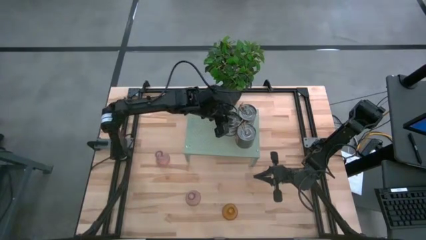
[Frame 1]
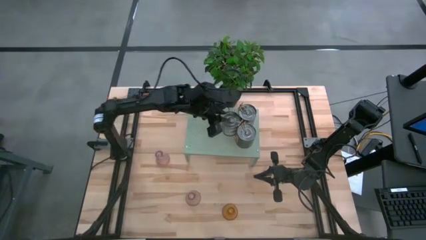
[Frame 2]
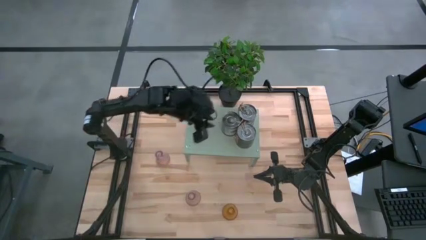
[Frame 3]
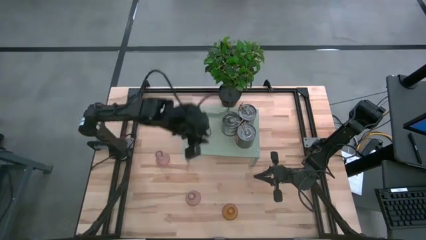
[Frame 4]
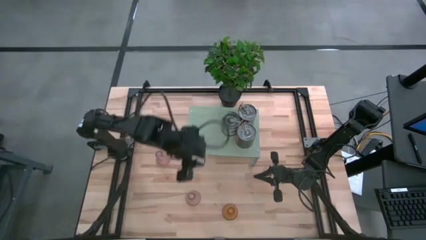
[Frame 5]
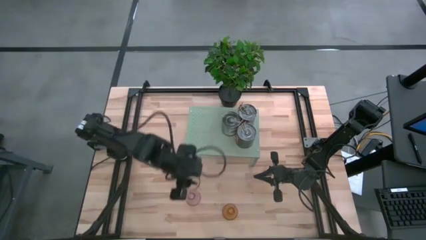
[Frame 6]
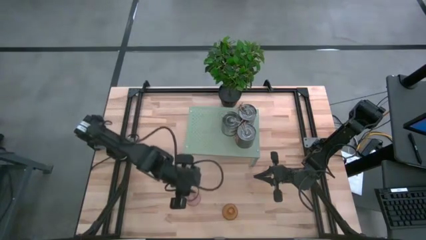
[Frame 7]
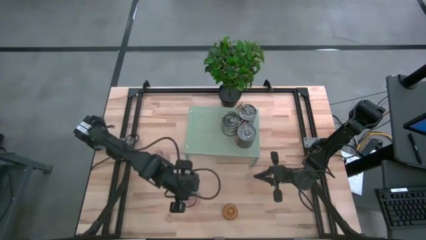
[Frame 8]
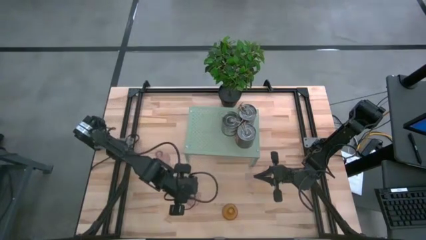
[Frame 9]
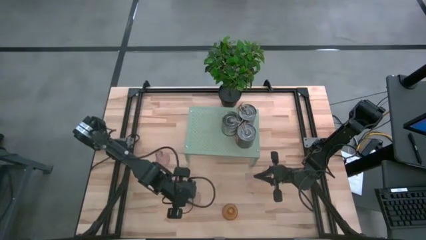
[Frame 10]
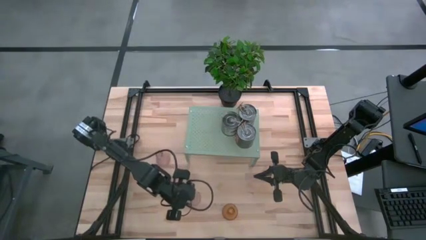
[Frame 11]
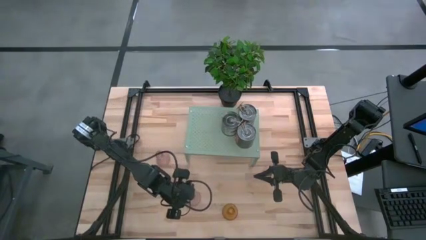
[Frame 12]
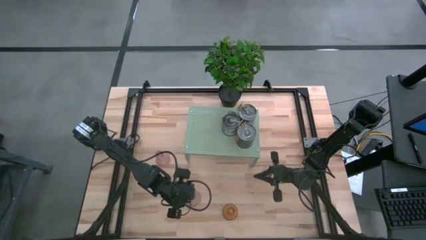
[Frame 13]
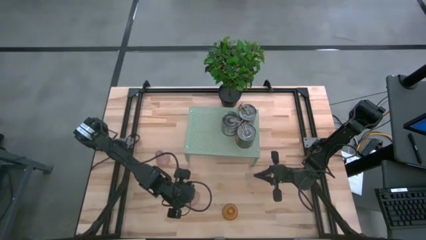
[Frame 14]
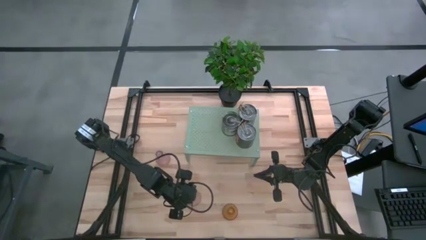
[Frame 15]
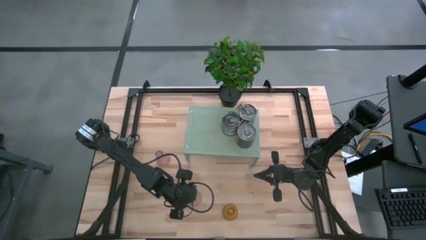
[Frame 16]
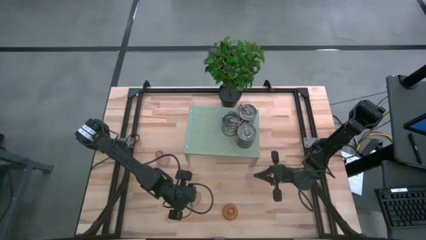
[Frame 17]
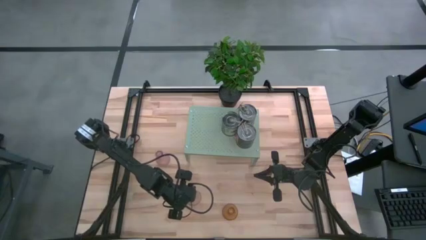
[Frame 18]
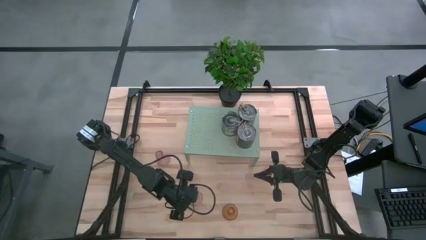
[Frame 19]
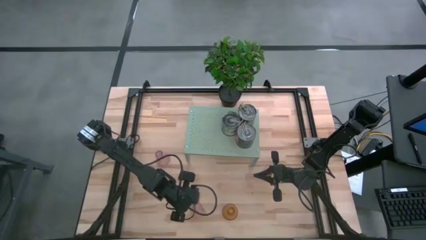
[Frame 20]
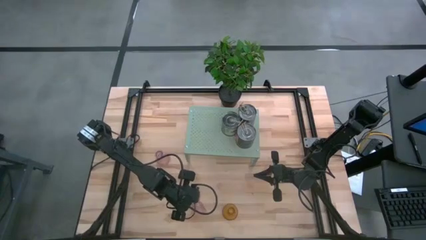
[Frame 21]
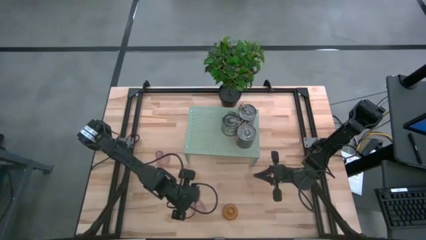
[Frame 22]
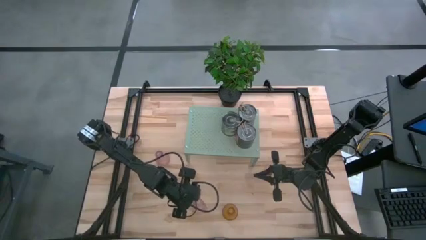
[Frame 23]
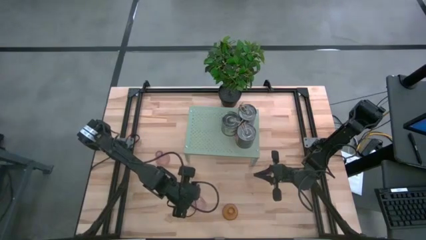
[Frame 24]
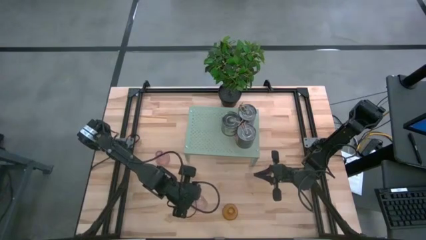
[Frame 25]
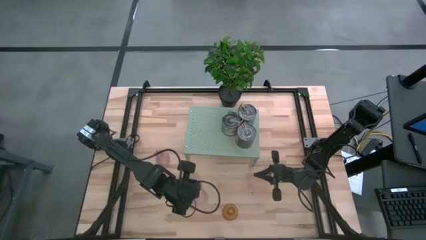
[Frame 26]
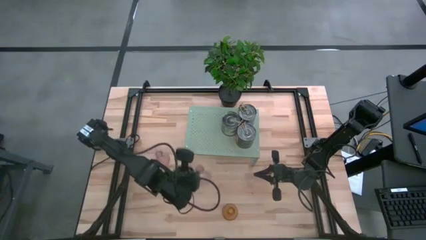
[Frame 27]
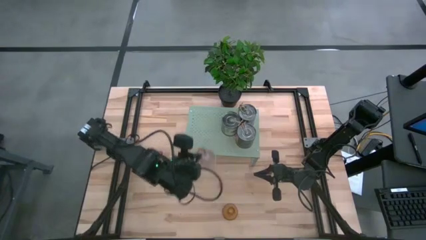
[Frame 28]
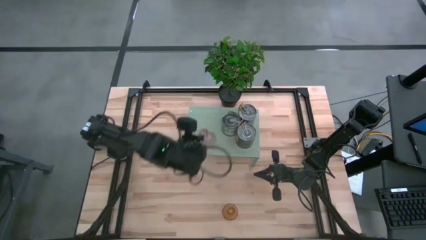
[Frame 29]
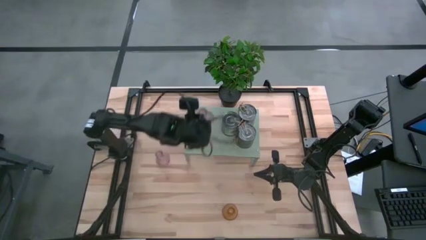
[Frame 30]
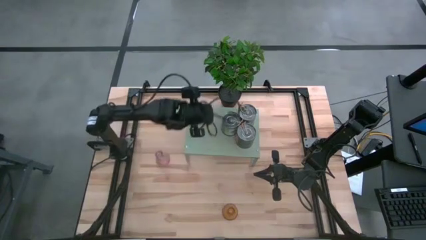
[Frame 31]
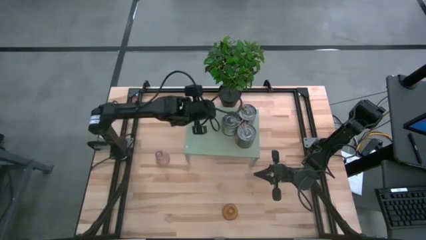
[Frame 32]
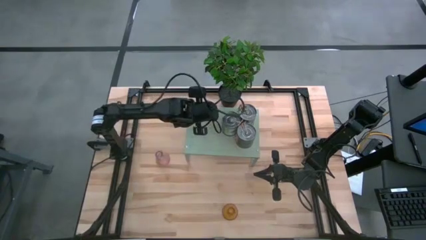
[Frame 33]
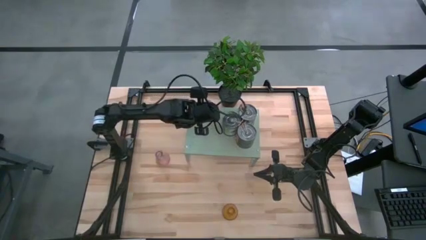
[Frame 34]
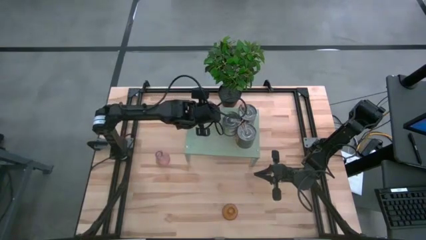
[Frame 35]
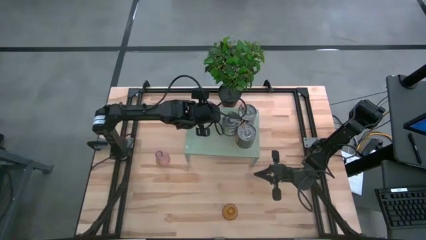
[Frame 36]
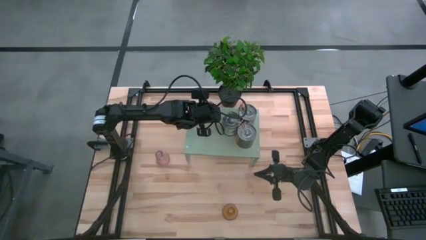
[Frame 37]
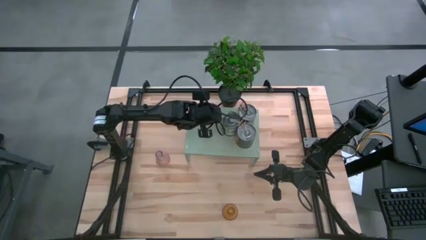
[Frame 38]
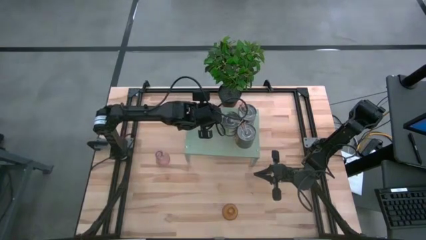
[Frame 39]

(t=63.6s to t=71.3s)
Task: Pick & Place candle stick holders
Put the bottom purple candle holder on the shelf

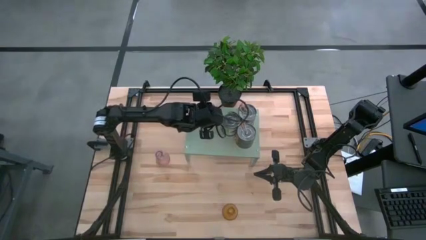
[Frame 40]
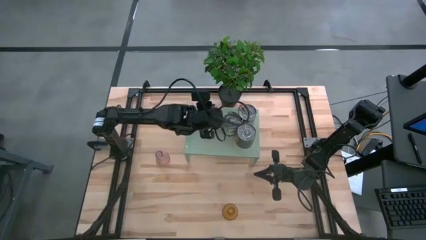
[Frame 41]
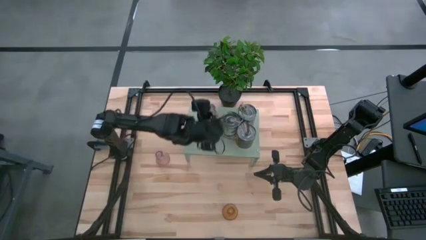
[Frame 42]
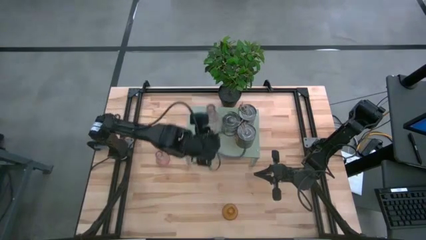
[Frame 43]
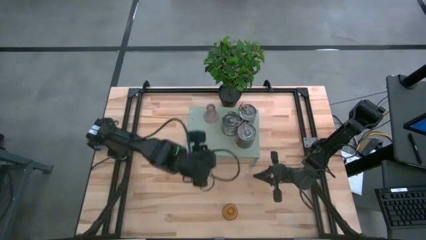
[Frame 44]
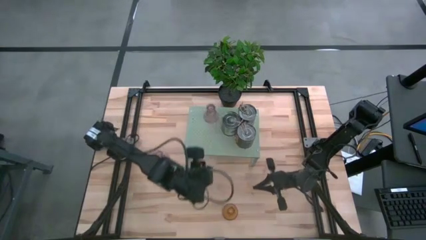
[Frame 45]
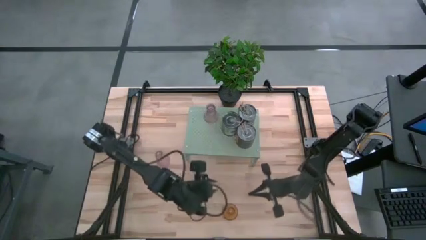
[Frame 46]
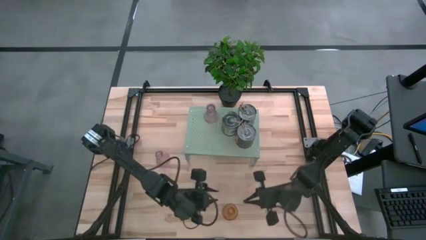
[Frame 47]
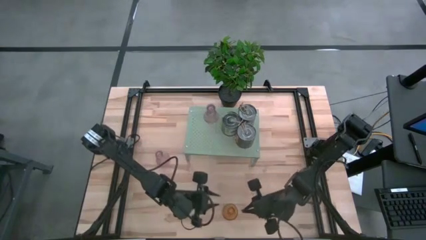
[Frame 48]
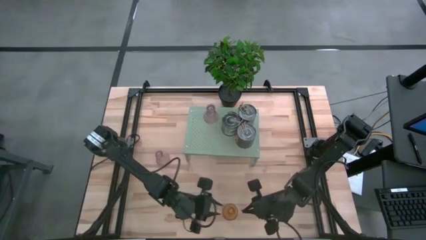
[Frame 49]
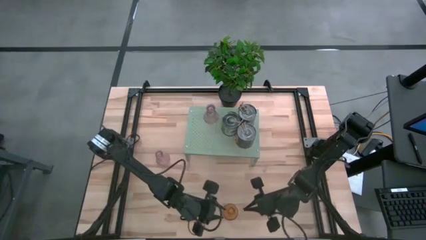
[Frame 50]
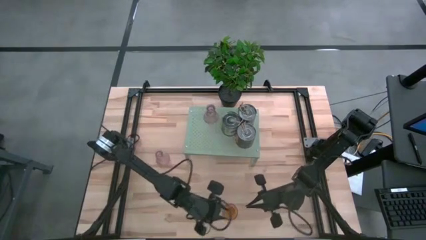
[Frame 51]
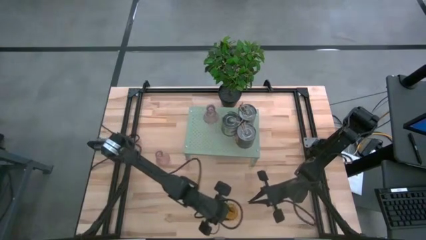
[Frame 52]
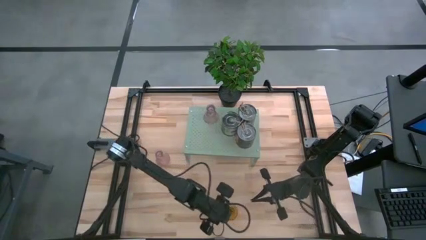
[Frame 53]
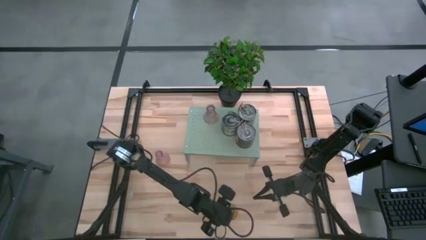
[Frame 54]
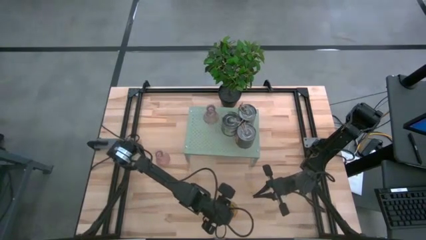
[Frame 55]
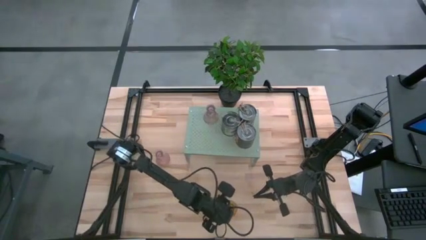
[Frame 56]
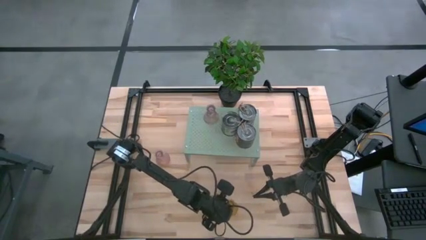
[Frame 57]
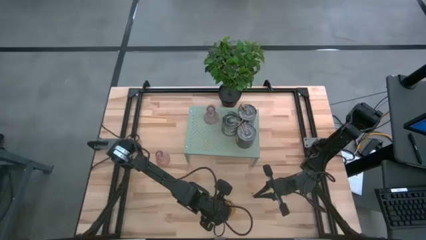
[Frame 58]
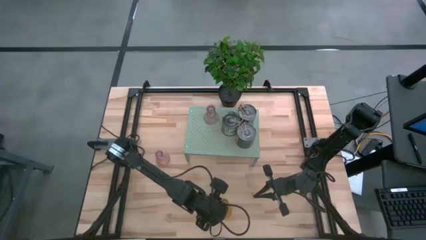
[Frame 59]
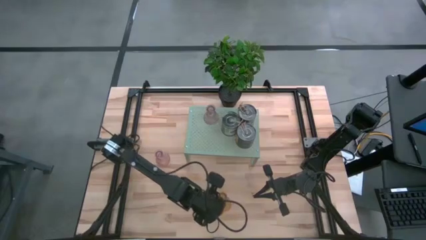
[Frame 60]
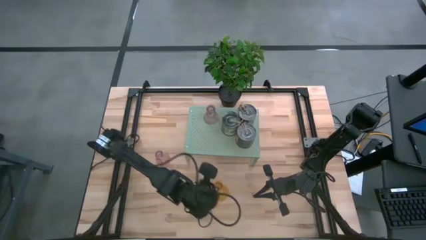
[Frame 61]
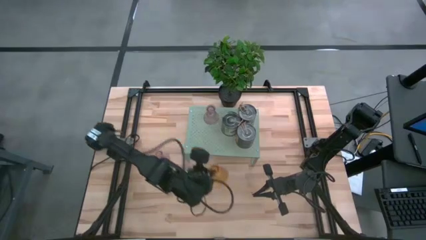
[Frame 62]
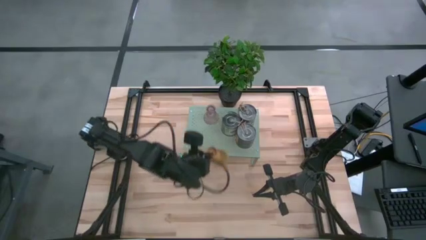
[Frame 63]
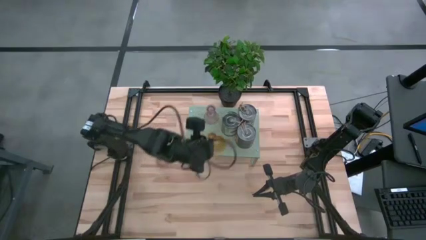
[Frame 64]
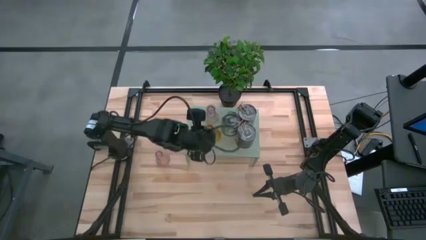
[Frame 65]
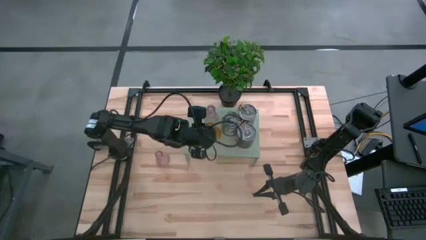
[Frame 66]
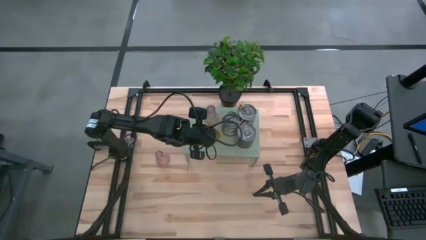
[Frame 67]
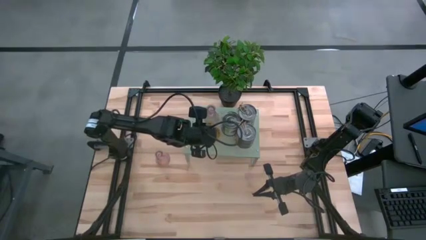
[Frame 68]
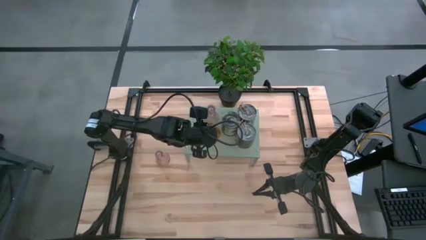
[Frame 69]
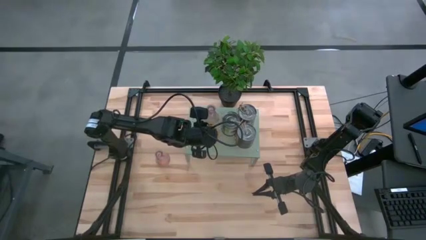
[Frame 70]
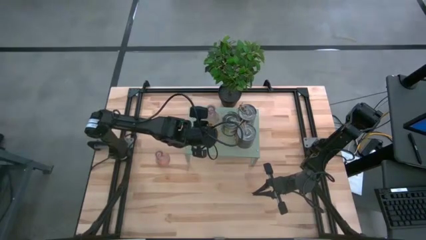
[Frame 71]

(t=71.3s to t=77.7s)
Put the yellow candle holder on the shelf

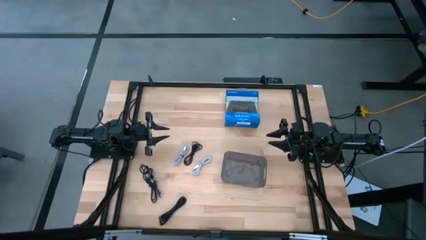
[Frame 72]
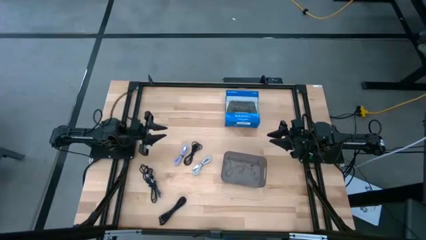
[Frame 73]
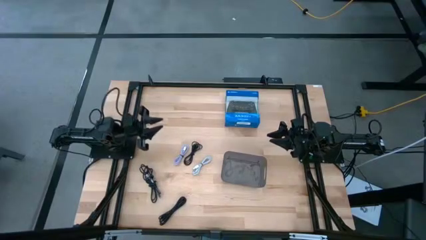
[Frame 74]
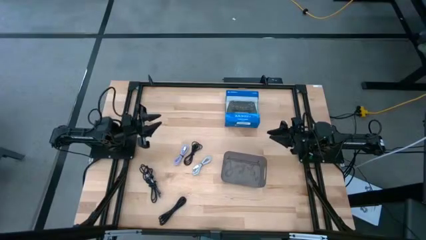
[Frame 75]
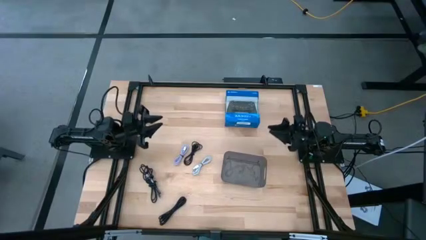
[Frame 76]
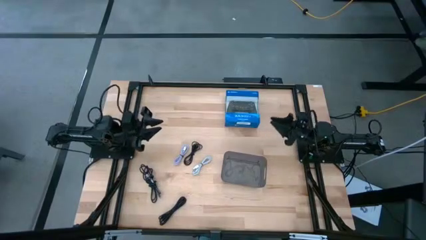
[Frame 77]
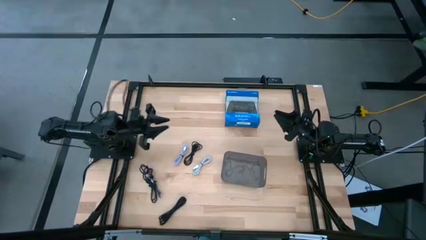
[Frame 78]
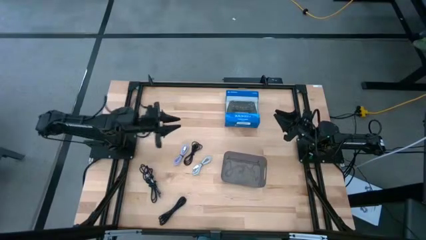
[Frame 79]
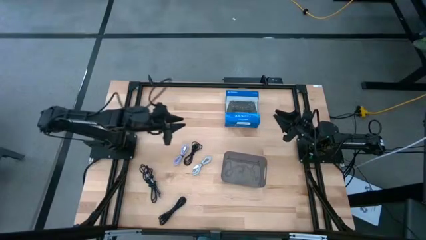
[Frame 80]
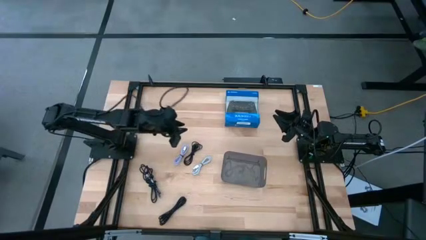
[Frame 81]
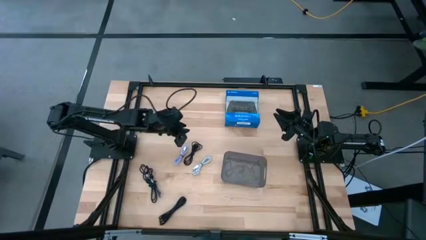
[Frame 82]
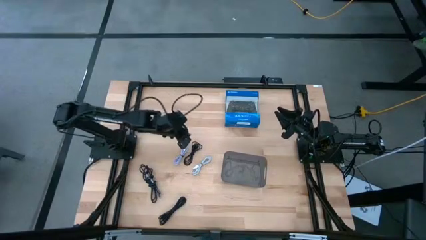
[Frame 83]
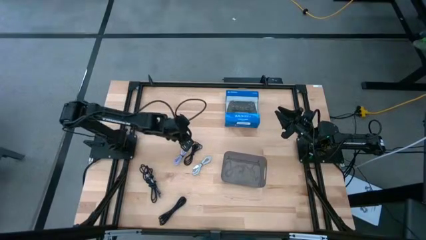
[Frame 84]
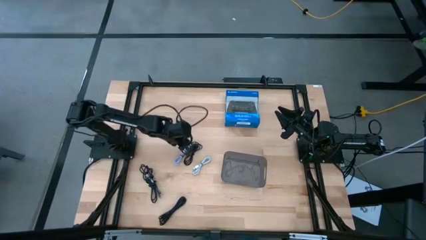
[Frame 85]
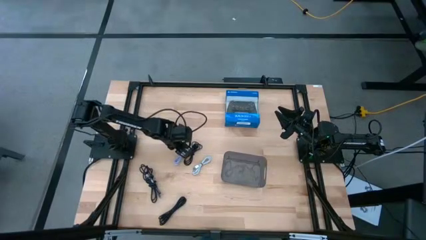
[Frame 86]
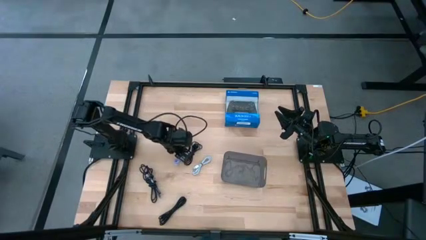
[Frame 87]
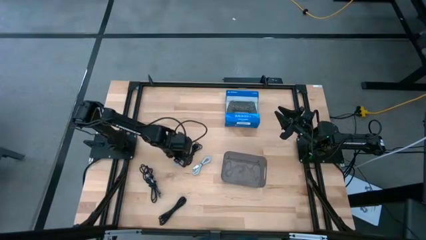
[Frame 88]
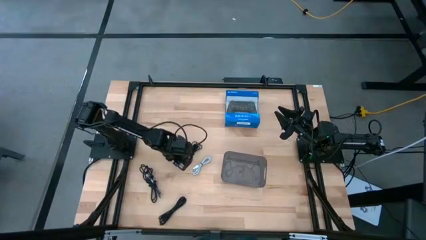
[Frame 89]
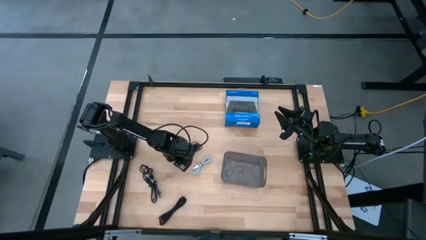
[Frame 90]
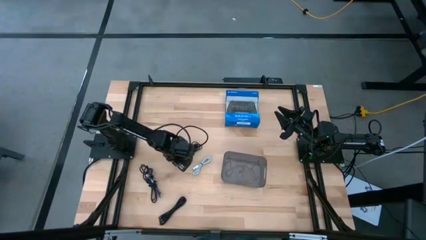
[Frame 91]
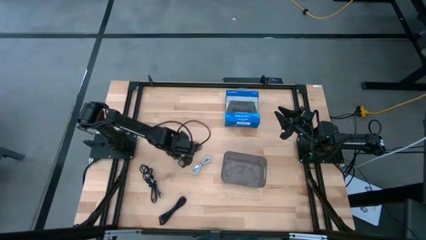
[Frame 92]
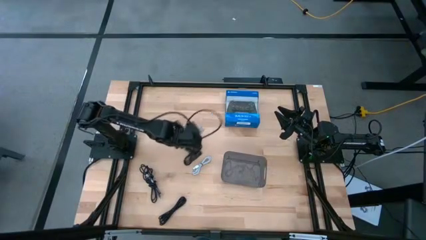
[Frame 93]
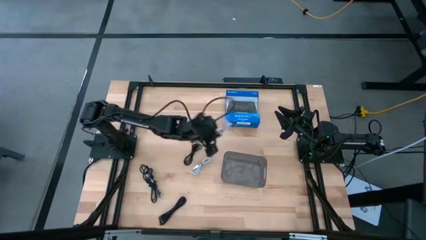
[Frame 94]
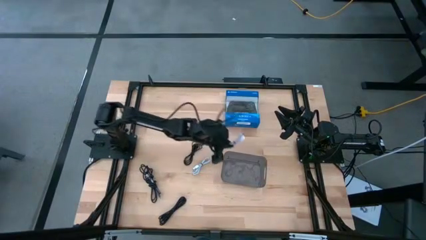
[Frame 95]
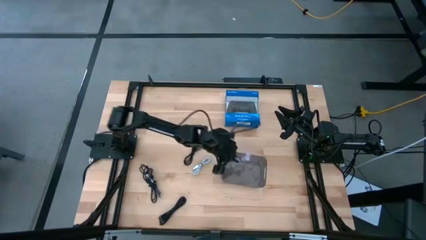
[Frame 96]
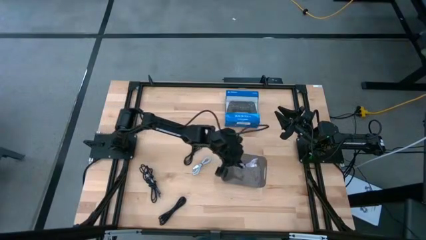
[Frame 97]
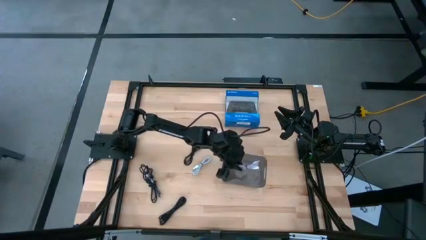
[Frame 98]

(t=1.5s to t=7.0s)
Task: Pick and place USB-C Cables
Put the purple charger cable into the black bin
